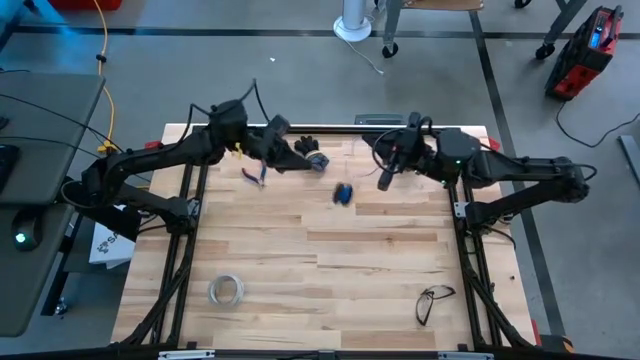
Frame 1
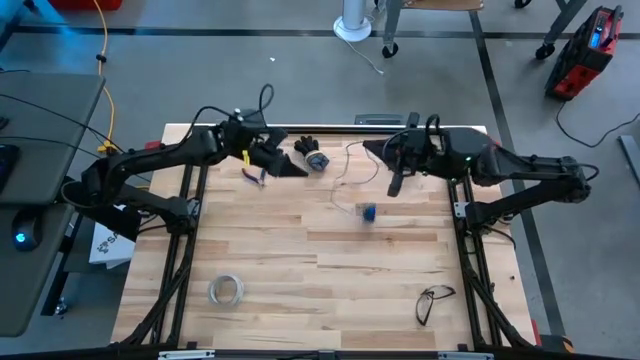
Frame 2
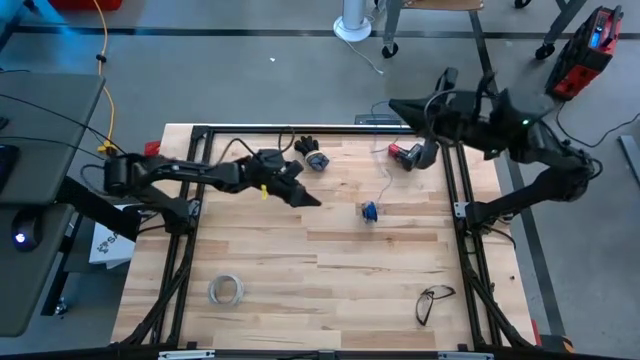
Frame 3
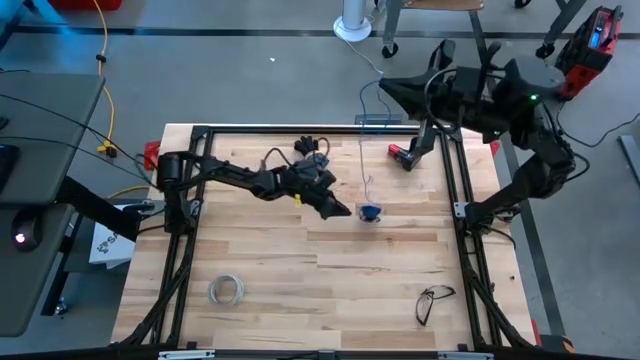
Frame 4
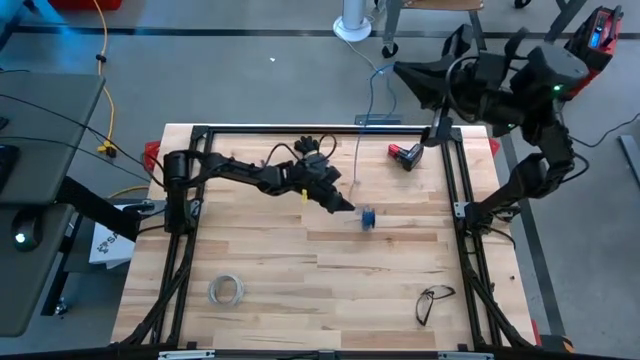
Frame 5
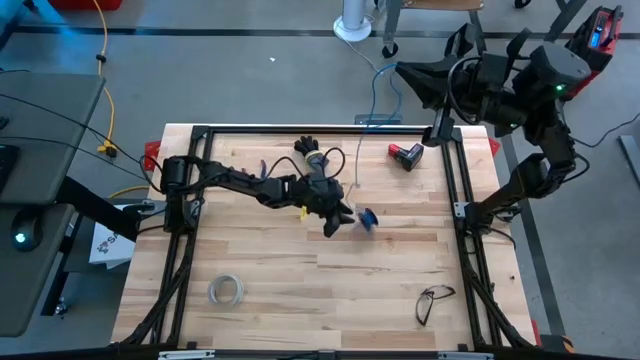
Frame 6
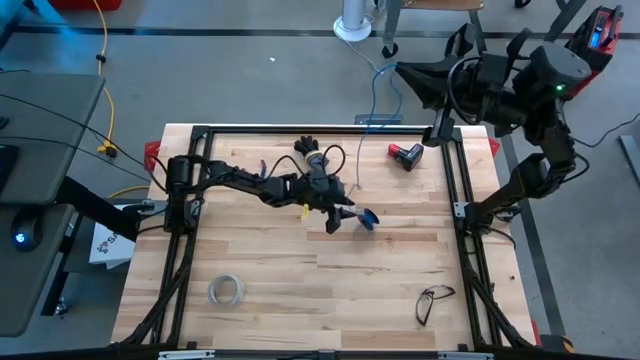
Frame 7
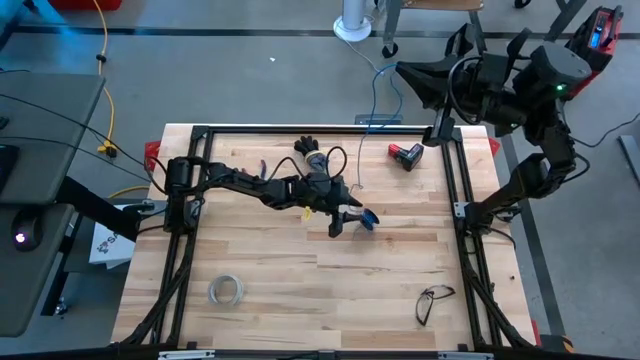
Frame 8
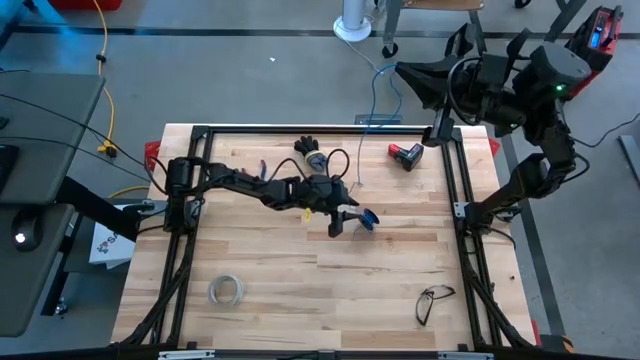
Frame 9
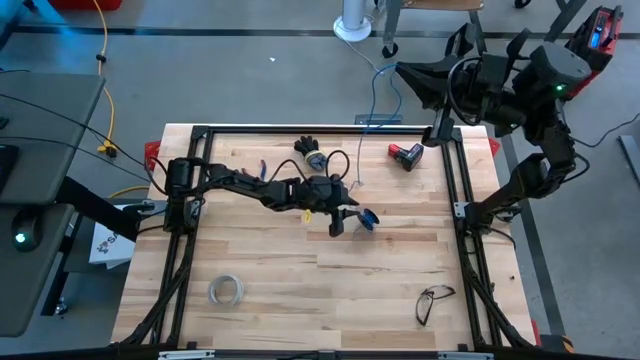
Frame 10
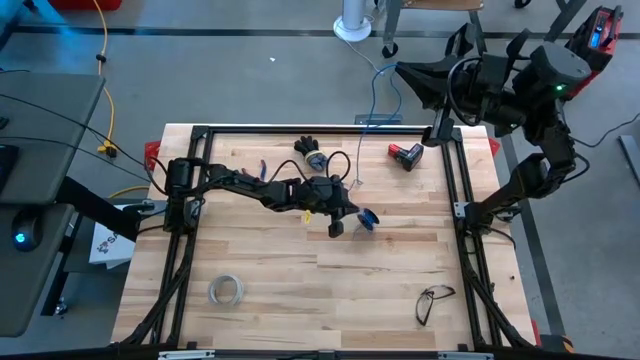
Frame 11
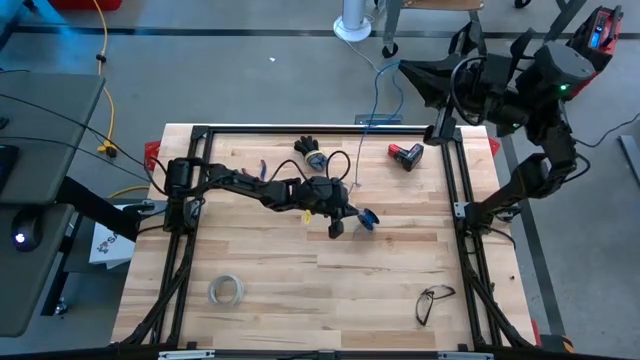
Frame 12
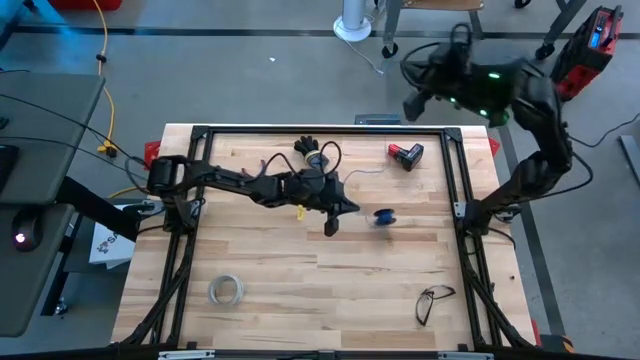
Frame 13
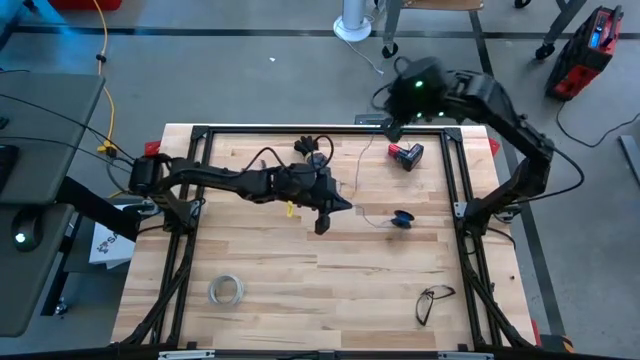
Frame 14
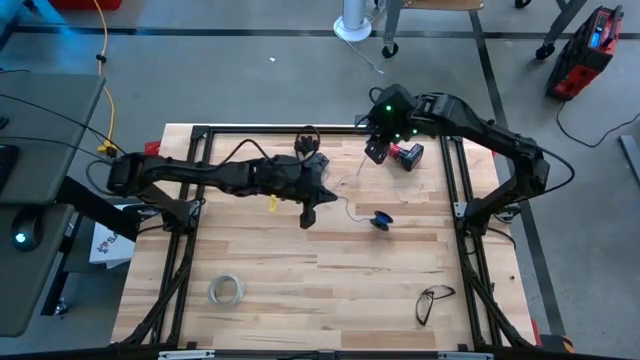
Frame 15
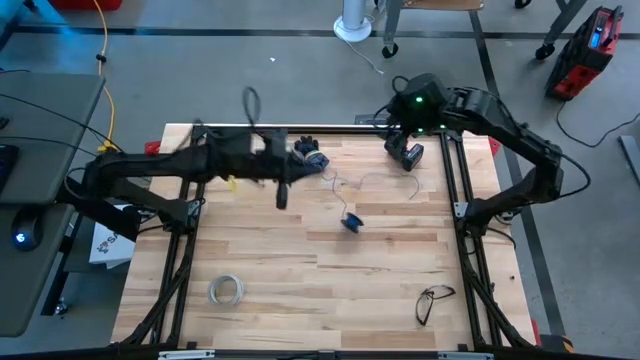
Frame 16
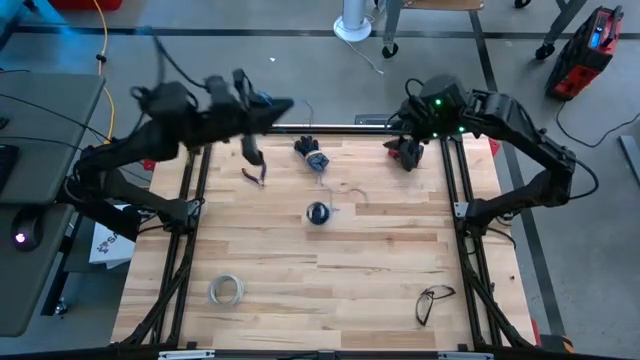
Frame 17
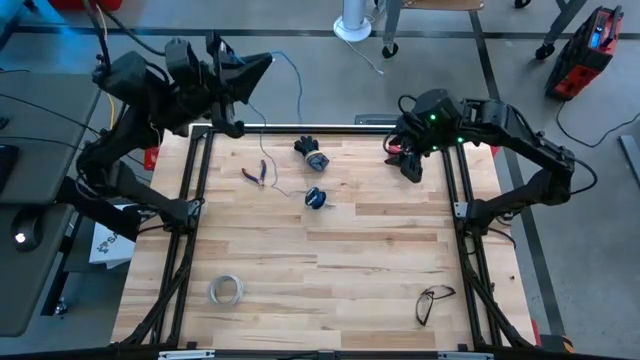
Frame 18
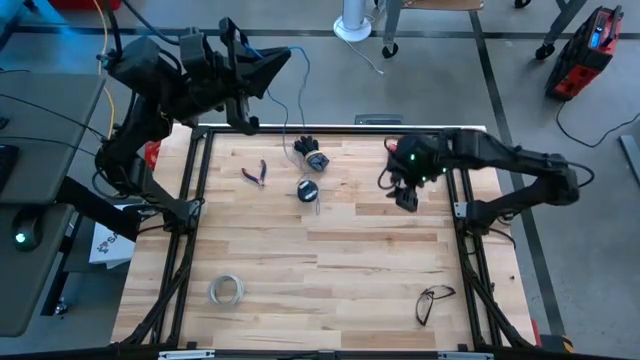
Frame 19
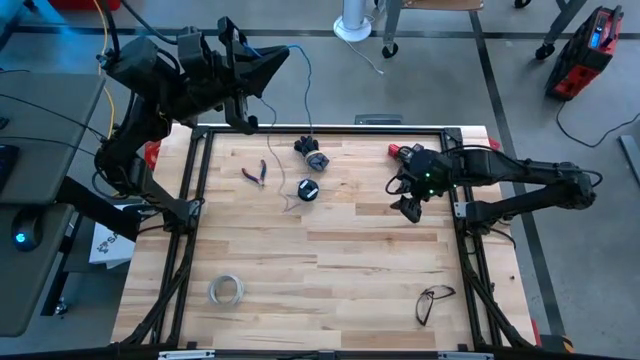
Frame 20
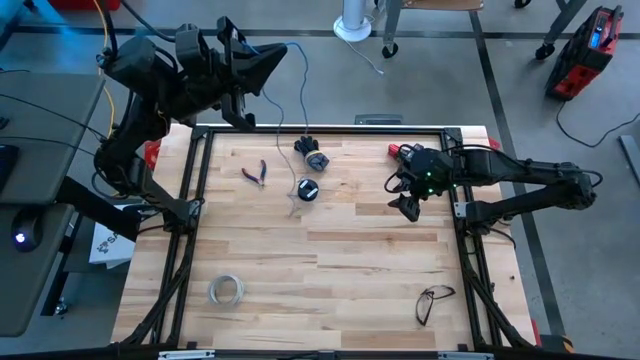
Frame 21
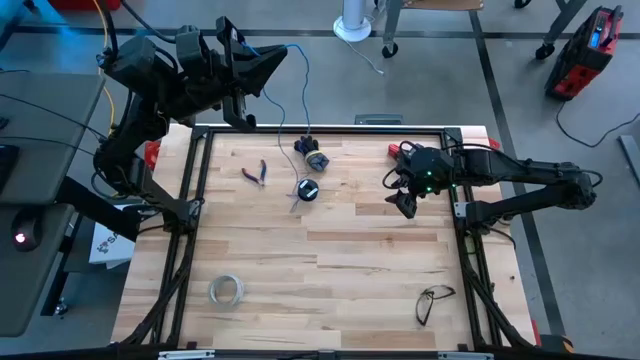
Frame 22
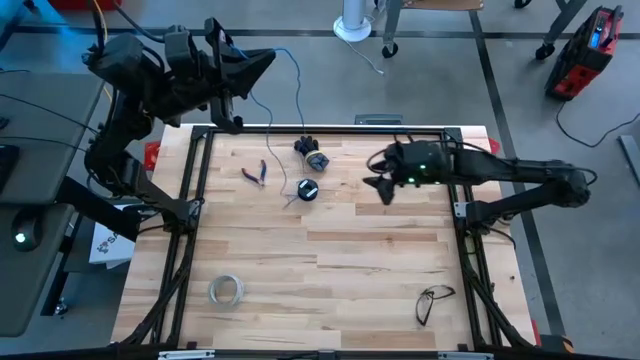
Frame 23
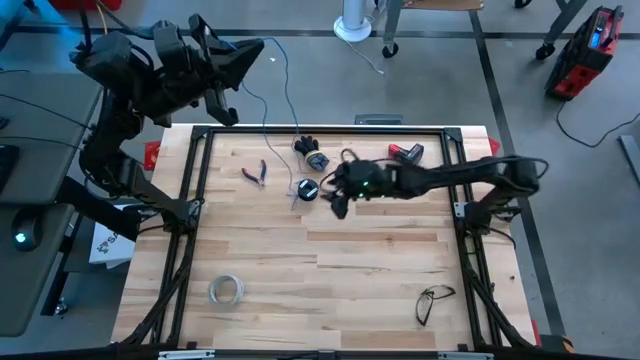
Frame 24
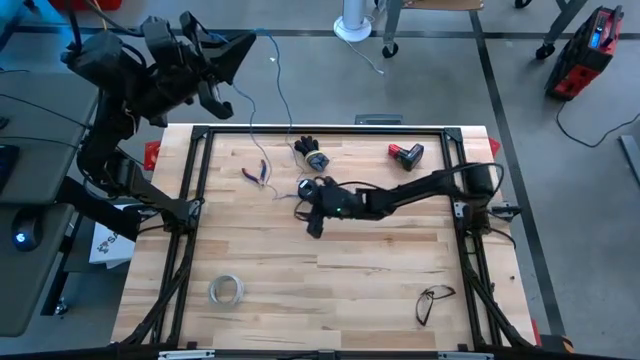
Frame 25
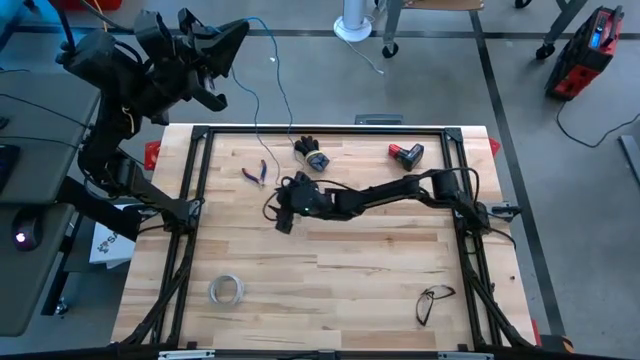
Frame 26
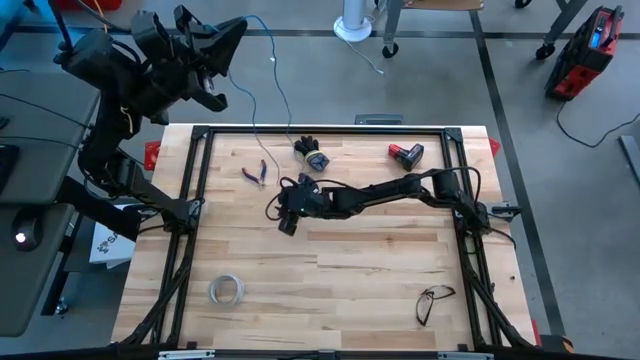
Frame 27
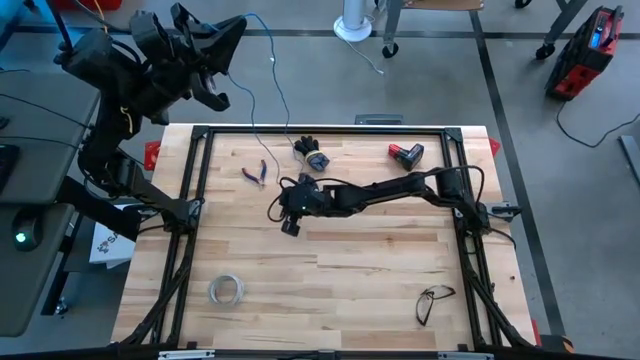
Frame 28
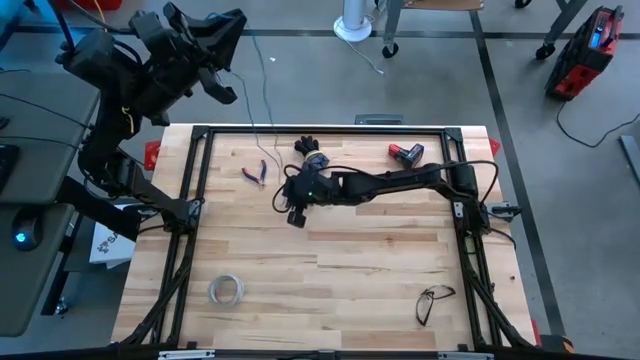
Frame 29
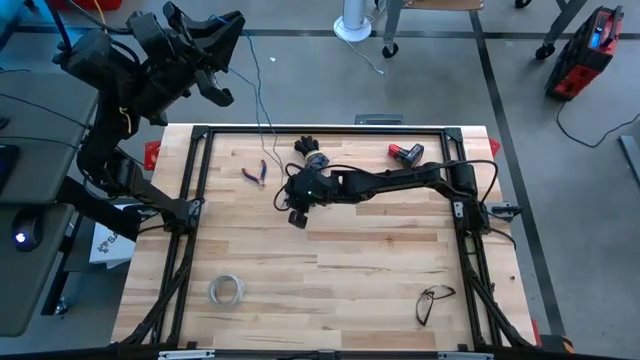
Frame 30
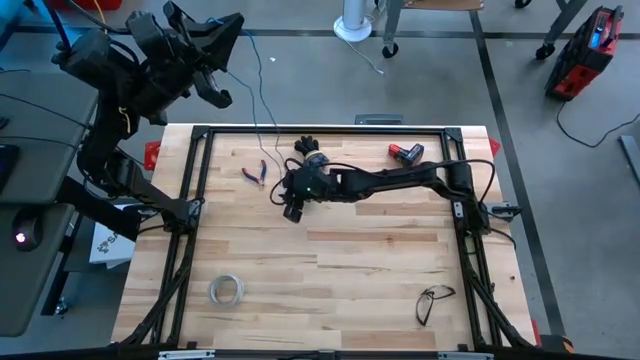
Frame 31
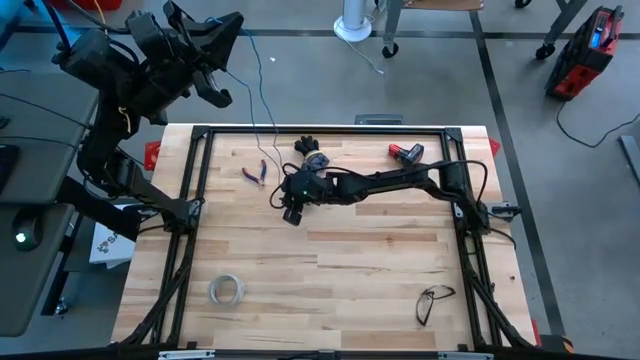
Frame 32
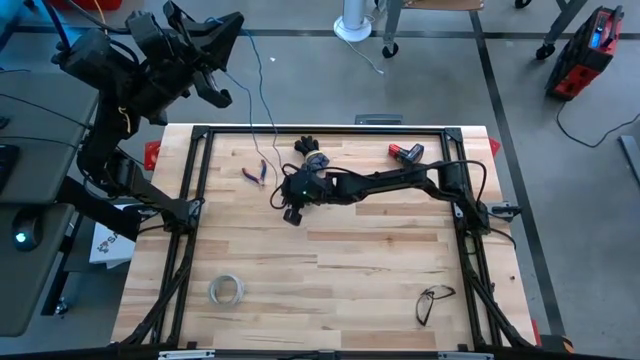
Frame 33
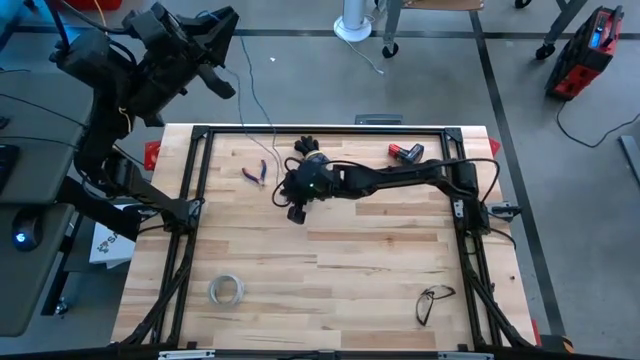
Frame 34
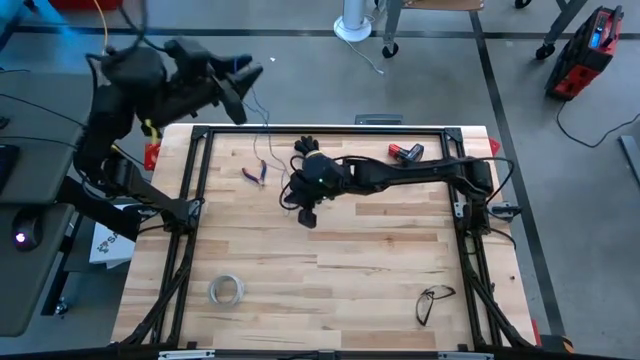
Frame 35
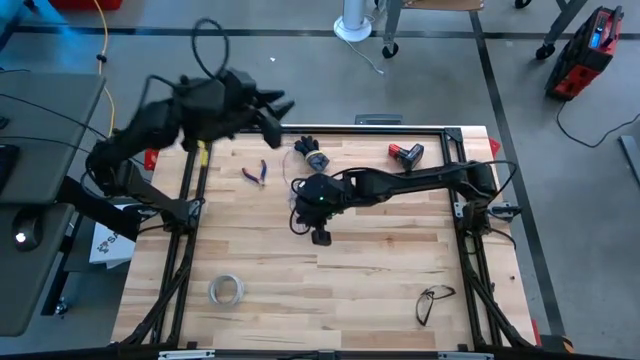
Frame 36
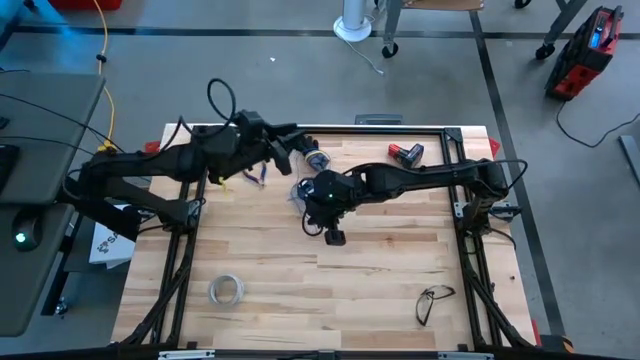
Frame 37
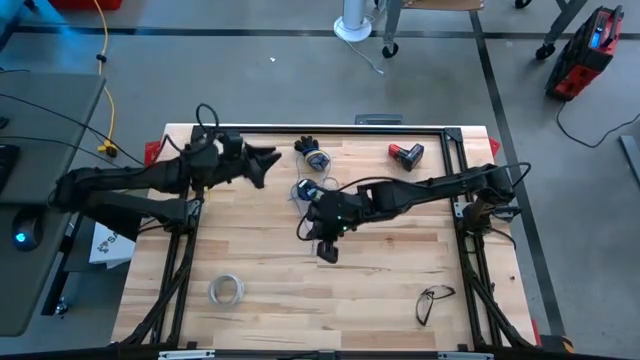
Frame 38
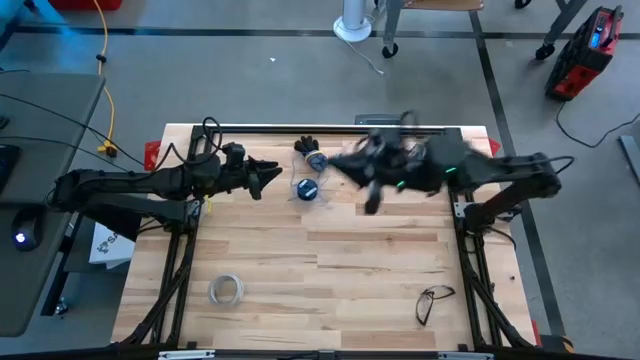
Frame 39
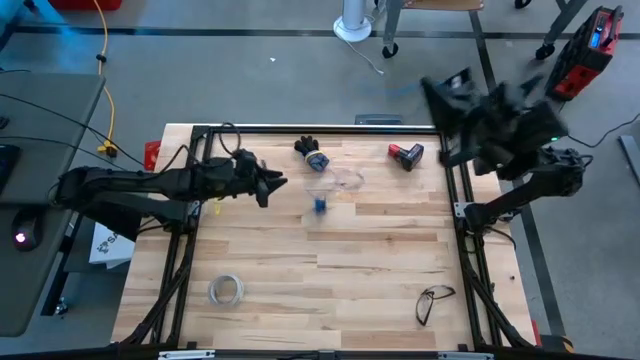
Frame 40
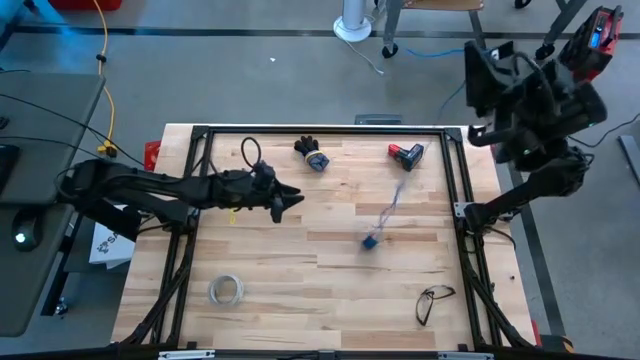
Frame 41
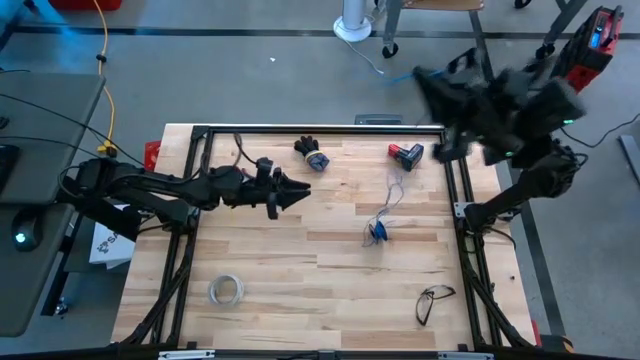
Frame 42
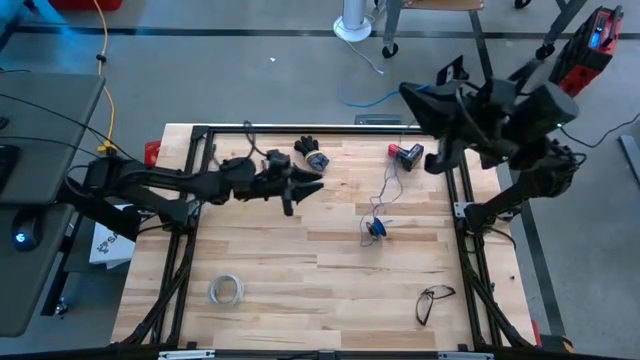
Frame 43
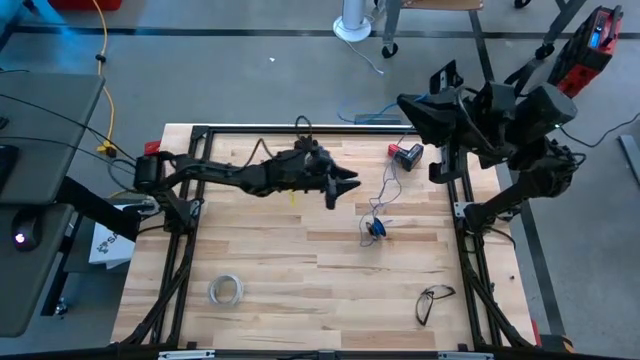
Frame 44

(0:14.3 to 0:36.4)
Task: Coil cords
Uncoil the blue wire from the black spool
